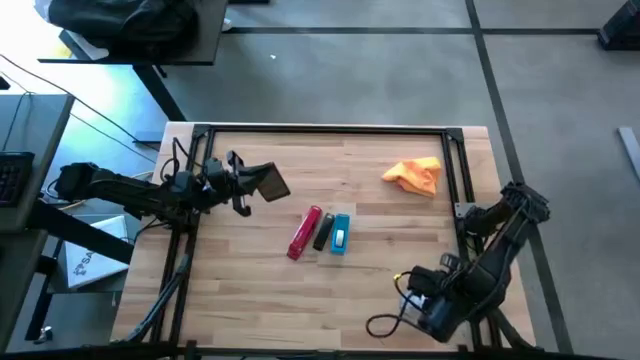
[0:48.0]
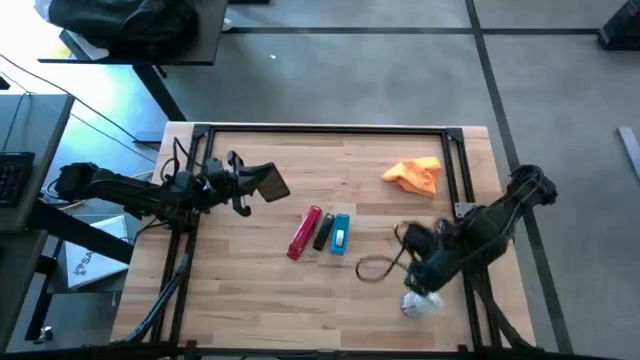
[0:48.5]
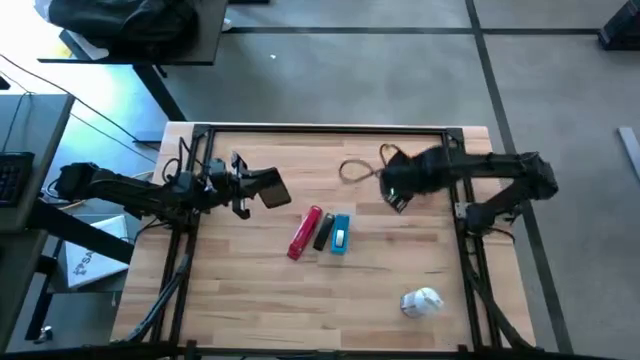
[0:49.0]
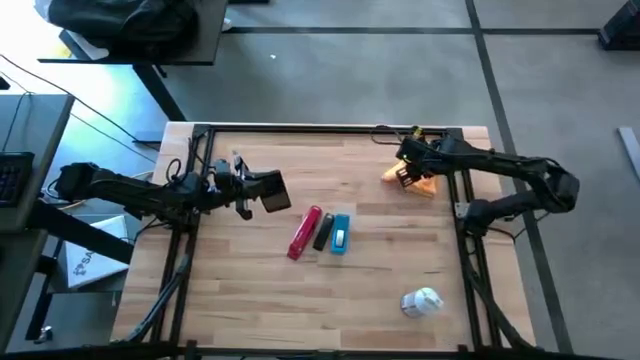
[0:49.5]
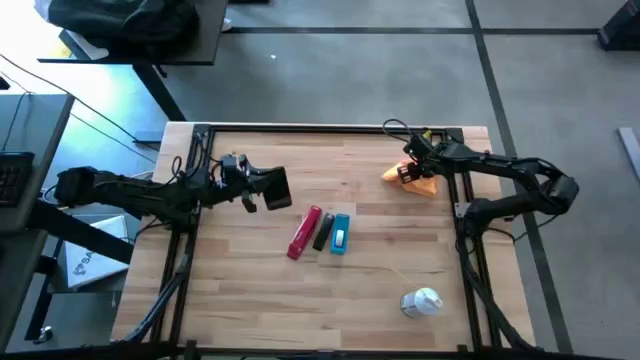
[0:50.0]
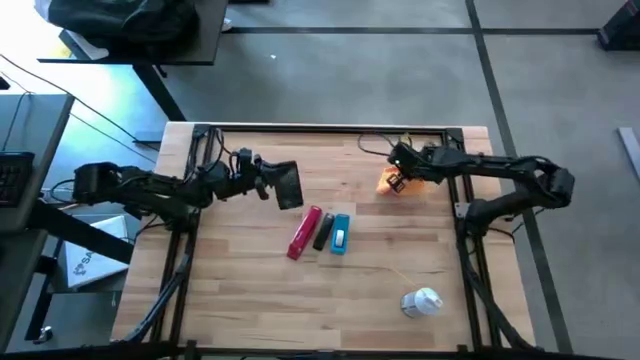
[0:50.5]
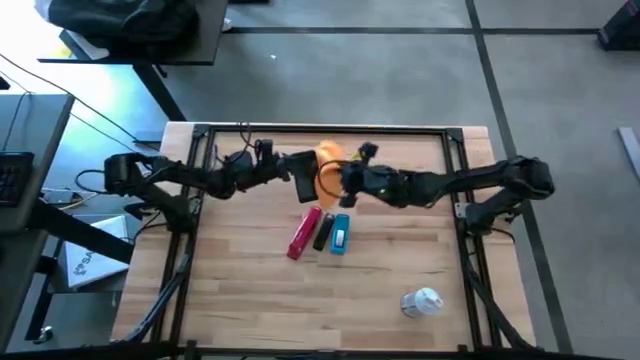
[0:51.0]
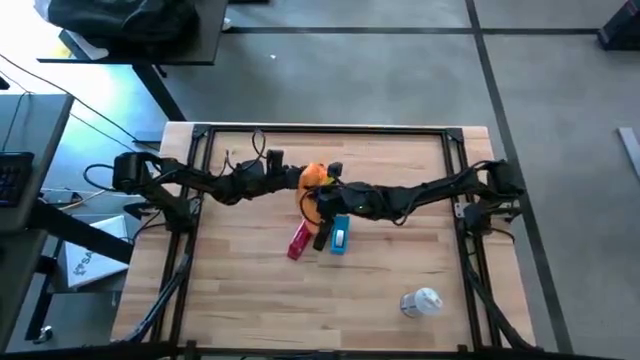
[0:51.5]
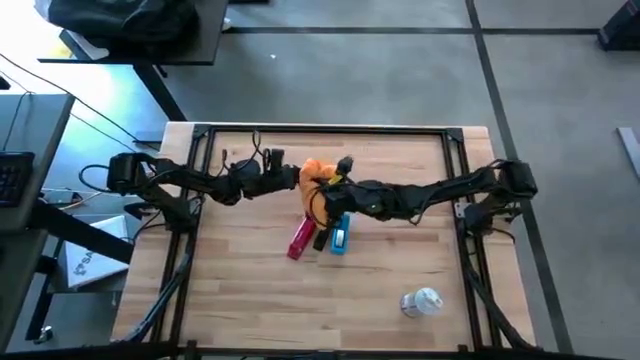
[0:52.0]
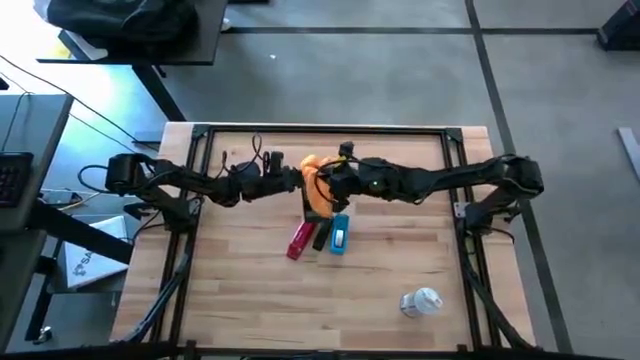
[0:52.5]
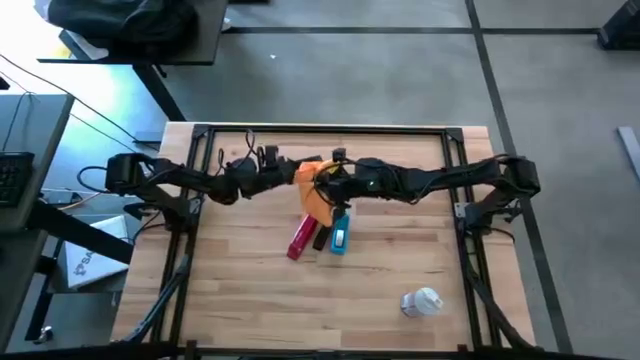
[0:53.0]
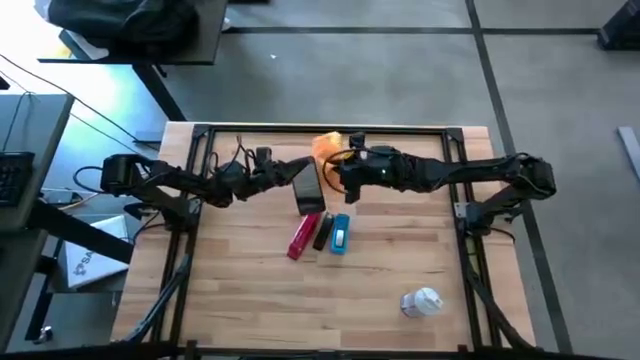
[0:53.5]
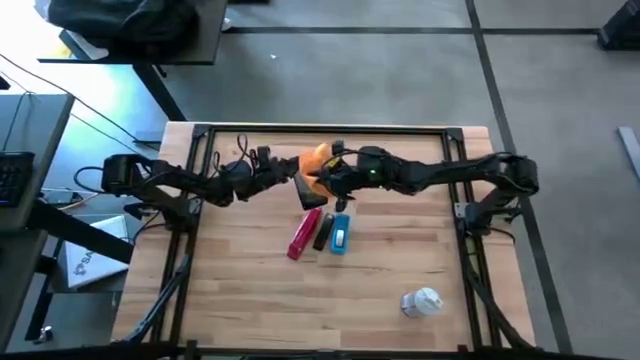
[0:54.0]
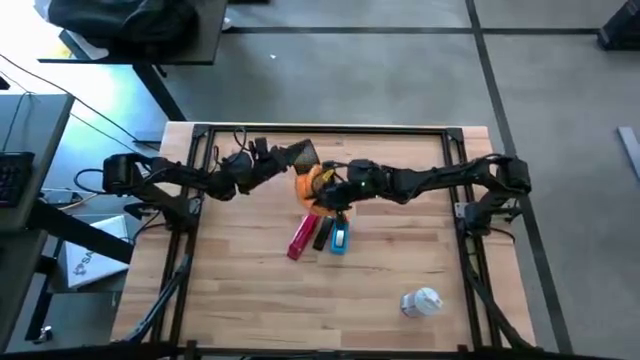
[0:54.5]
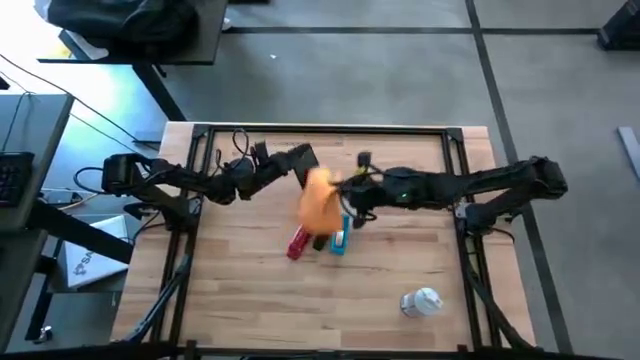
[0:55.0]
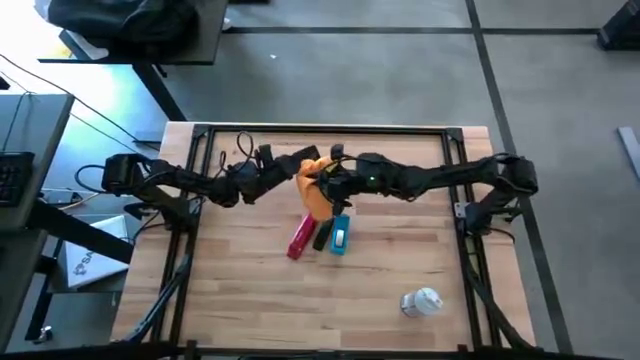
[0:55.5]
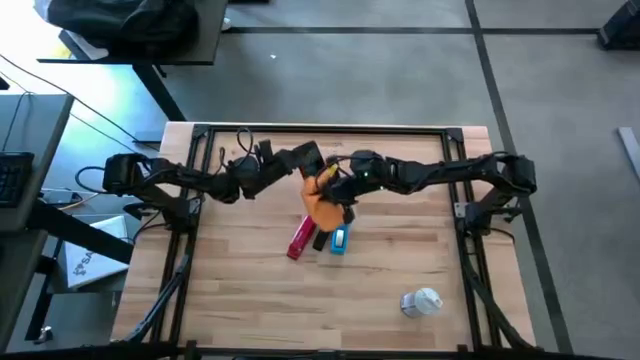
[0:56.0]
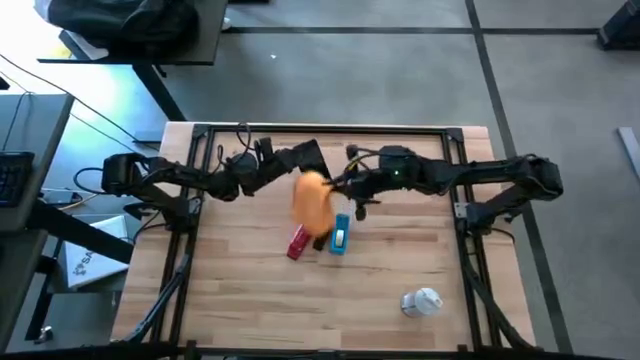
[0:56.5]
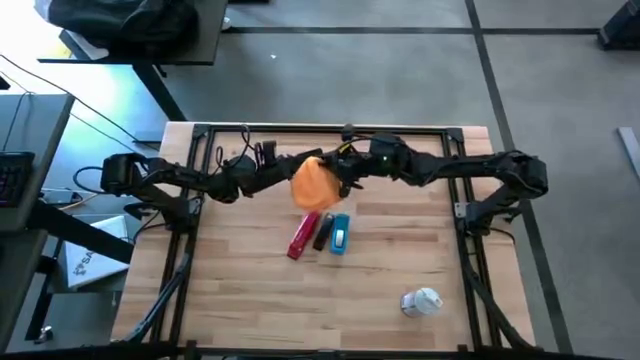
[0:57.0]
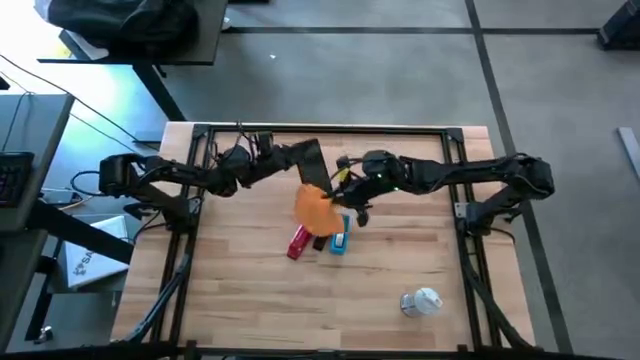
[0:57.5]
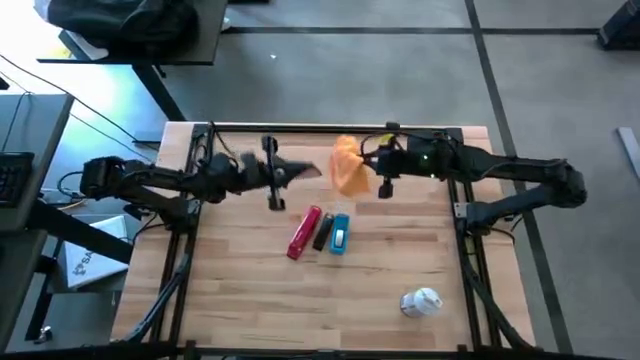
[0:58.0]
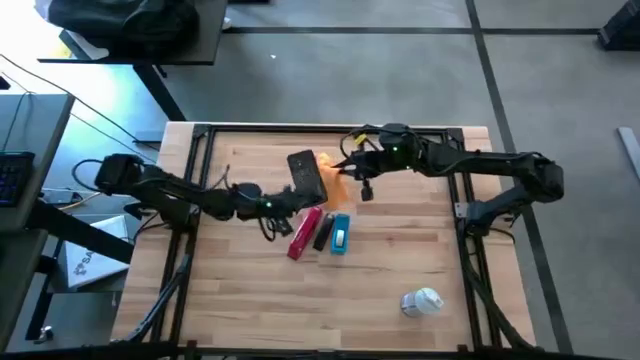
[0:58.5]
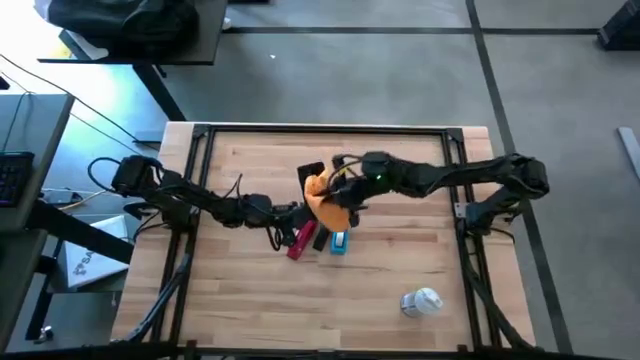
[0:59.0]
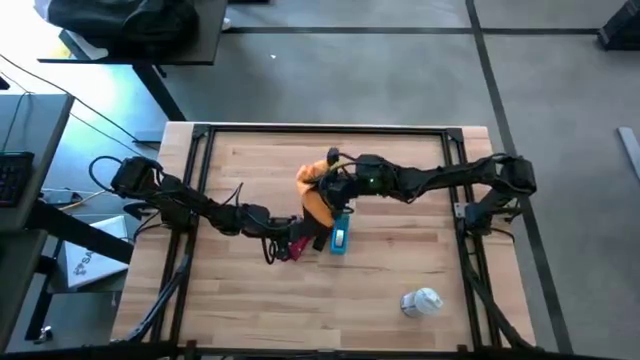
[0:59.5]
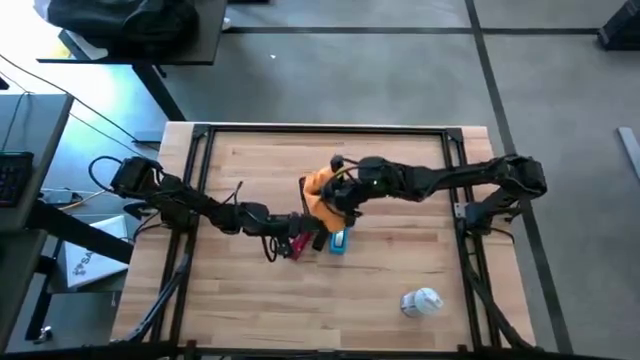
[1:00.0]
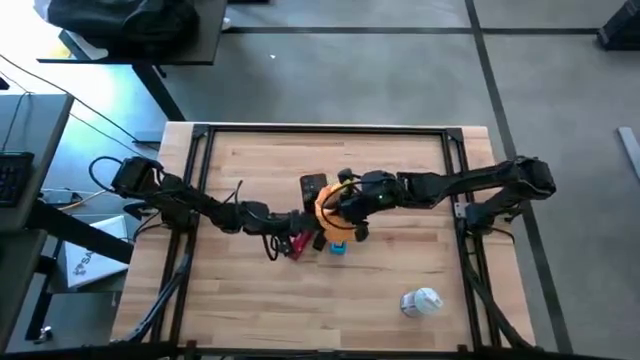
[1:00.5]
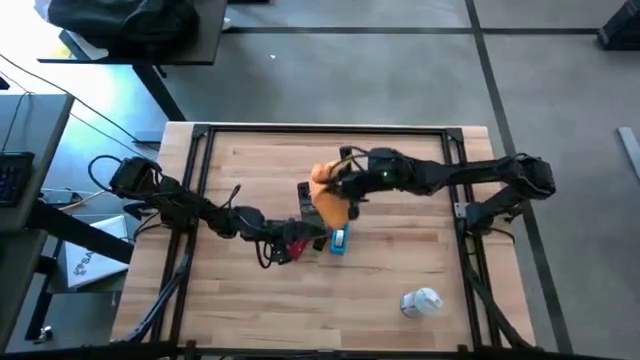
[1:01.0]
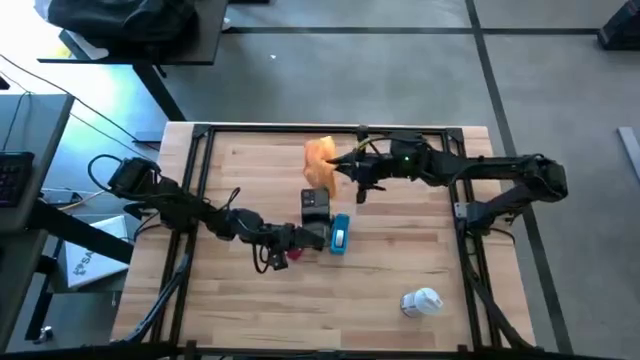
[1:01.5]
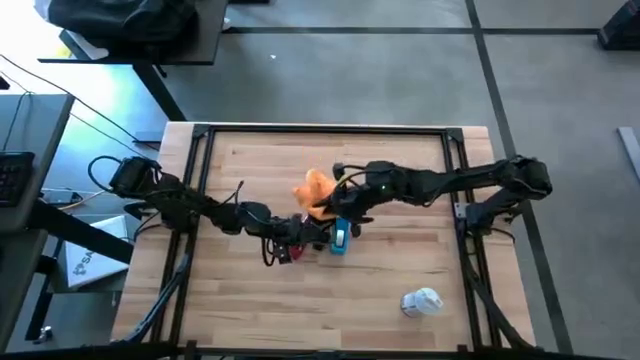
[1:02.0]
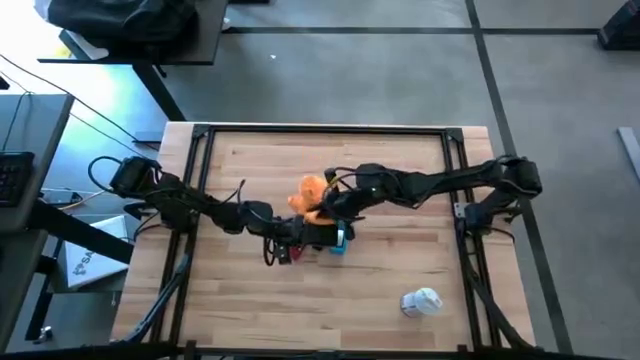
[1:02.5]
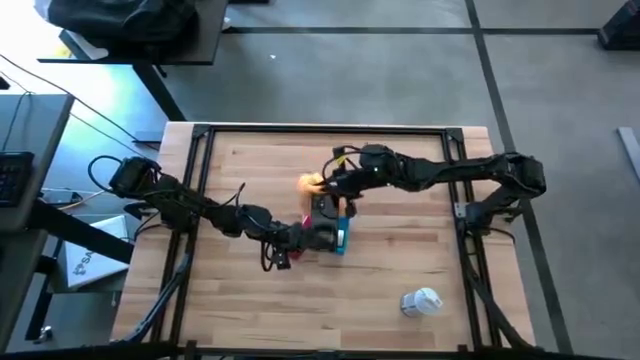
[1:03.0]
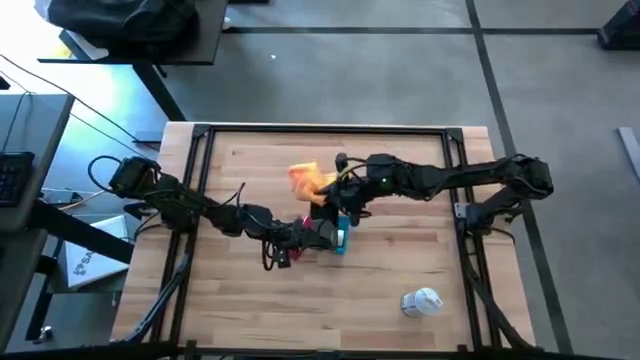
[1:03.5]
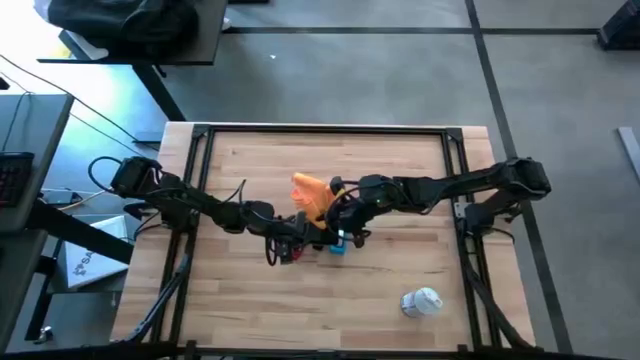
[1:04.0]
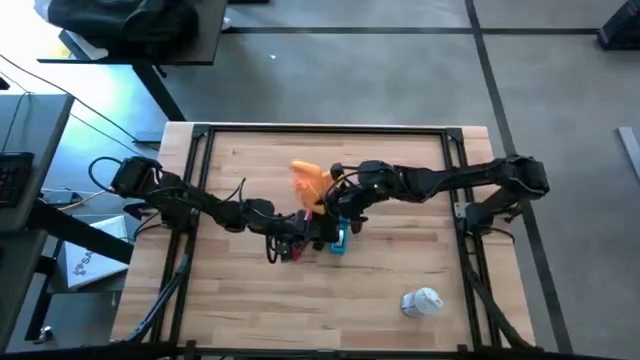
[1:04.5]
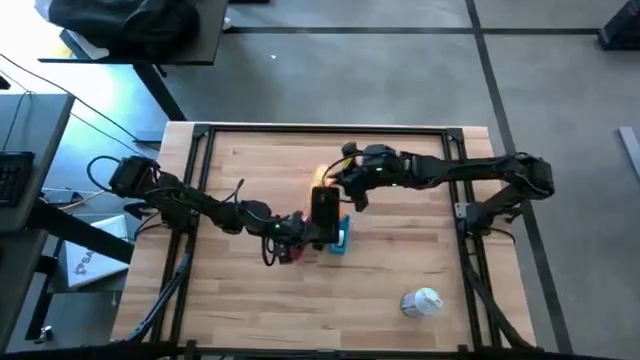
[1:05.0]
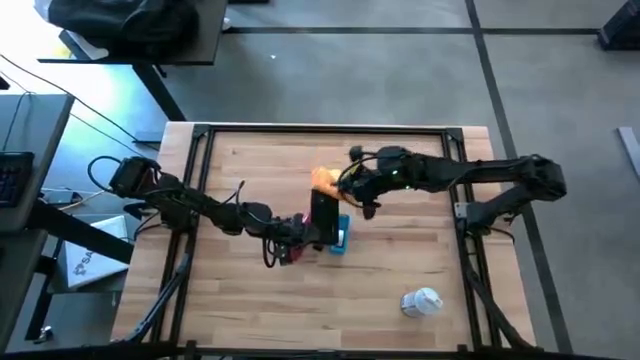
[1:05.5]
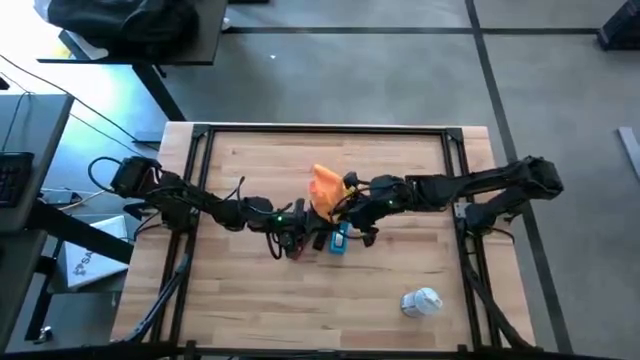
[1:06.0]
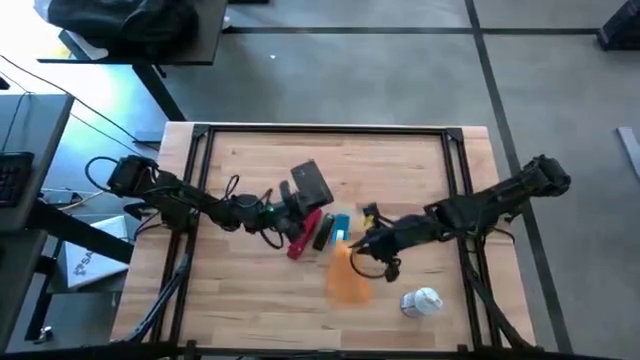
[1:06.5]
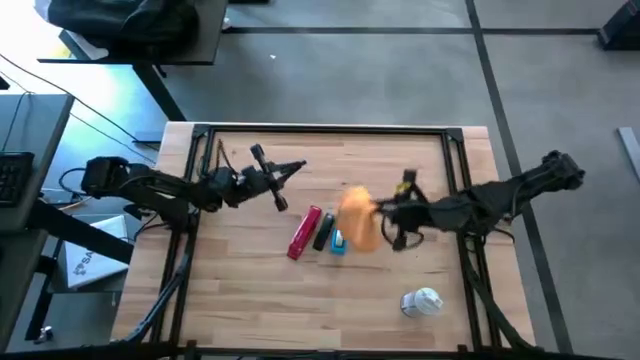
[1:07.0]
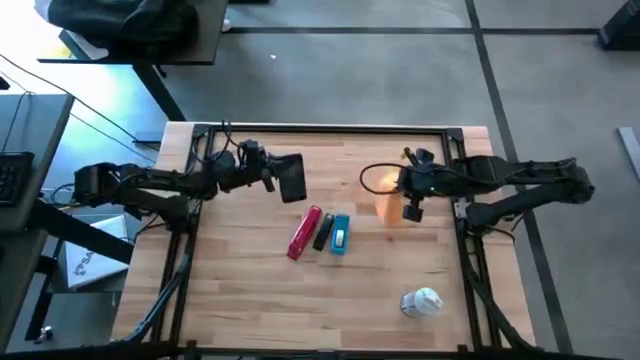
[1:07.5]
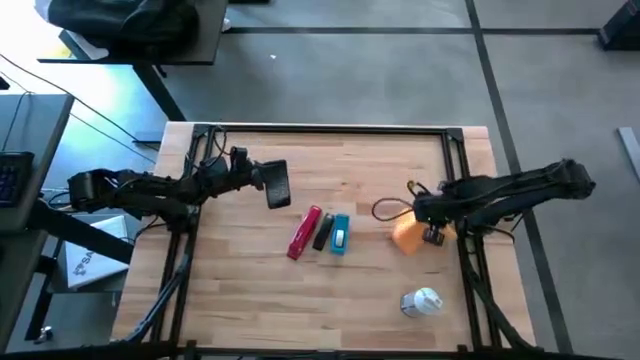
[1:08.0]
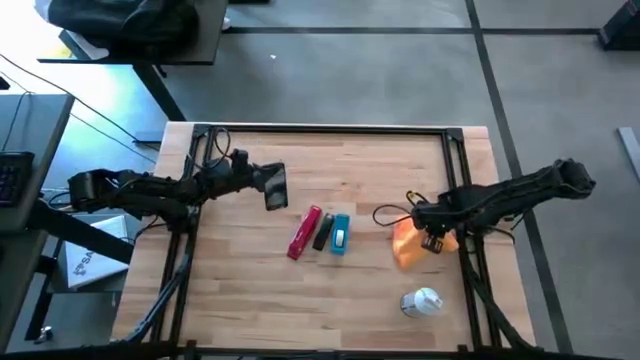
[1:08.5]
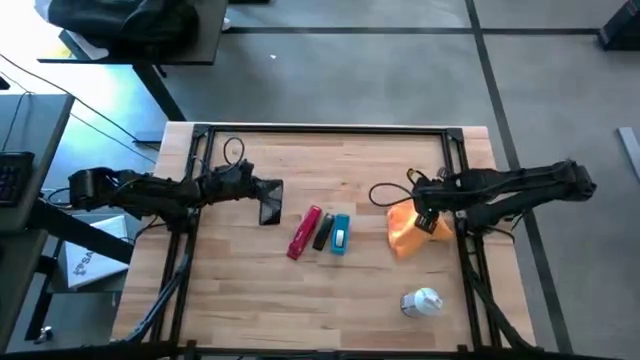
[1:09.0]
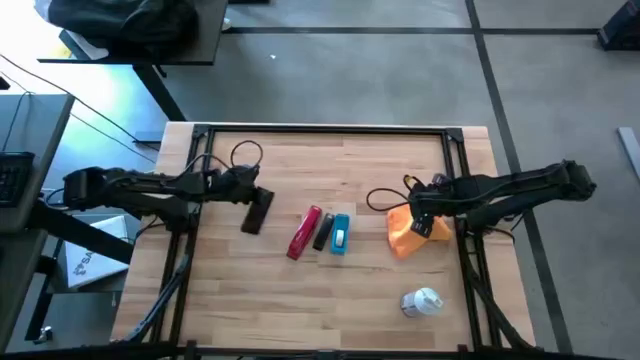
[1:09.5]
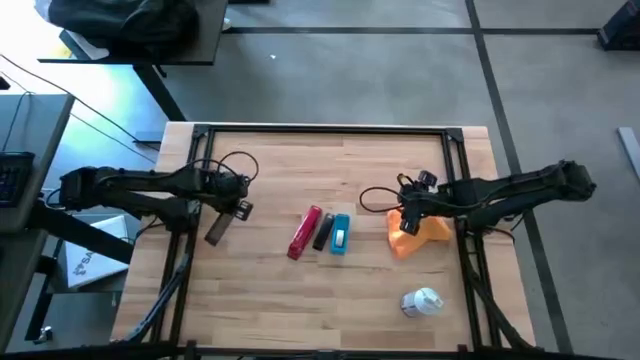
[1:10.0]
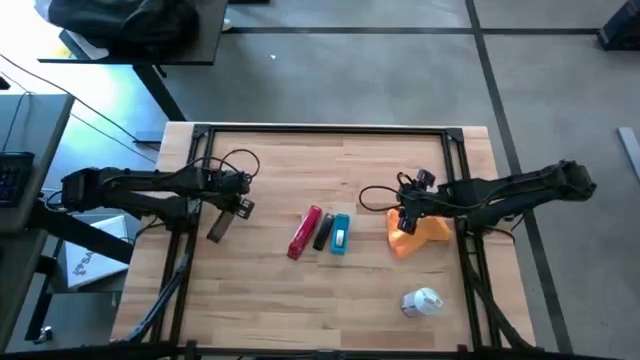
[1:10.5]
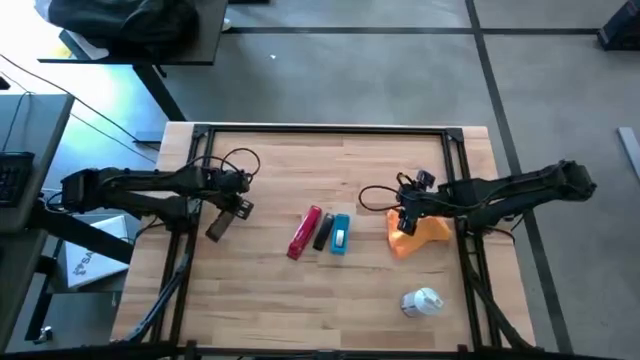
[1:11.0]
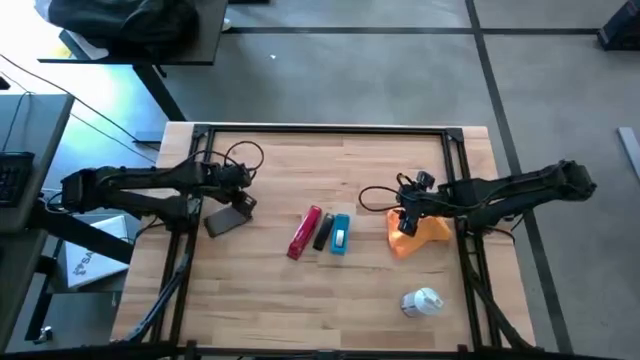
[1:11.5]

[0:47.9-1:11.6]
Task: Apply microfiber cloth
Wipe the front and back of the black cellphone with the orange microfiber cloth
